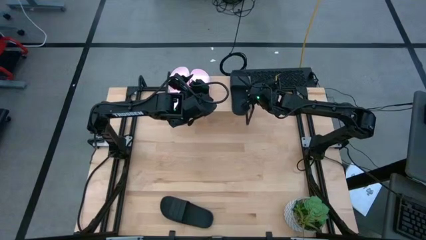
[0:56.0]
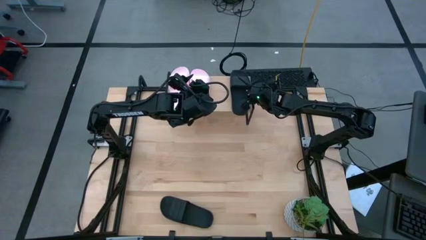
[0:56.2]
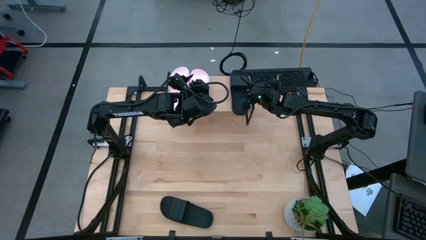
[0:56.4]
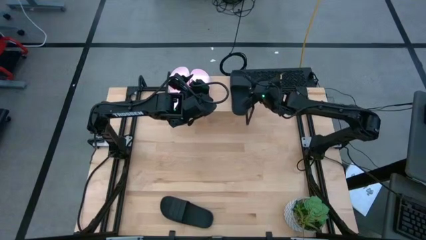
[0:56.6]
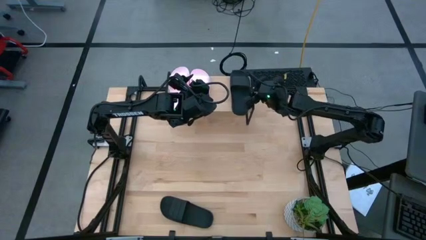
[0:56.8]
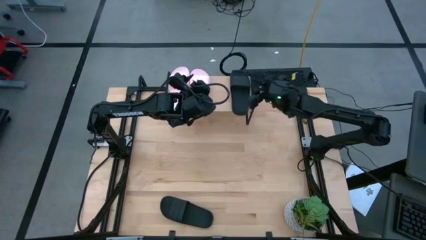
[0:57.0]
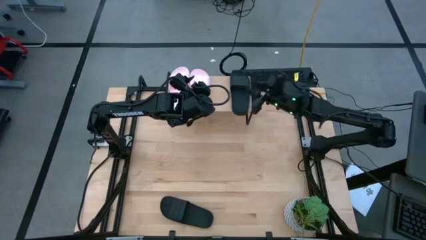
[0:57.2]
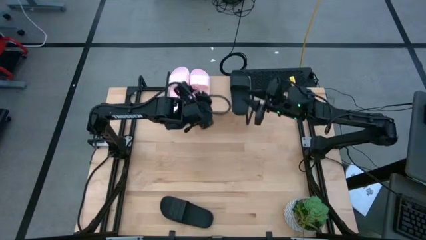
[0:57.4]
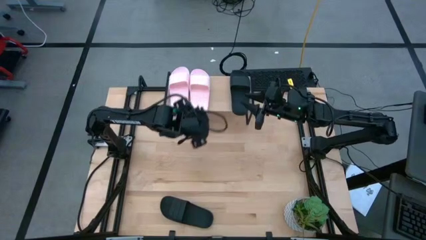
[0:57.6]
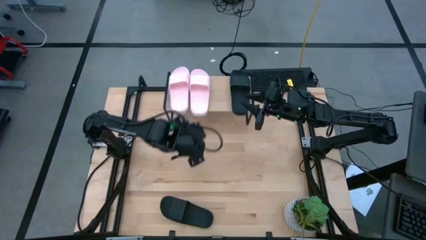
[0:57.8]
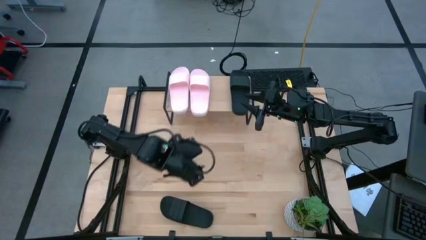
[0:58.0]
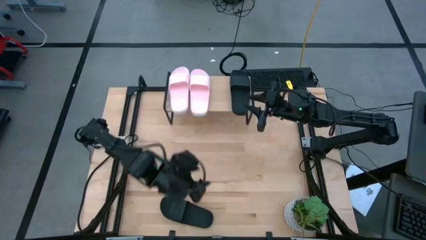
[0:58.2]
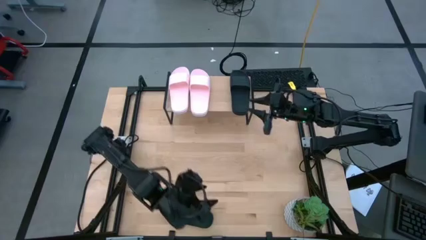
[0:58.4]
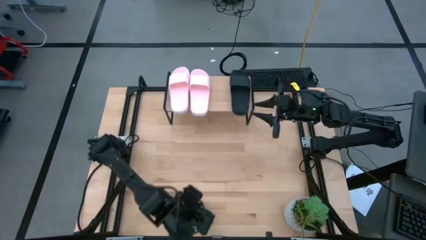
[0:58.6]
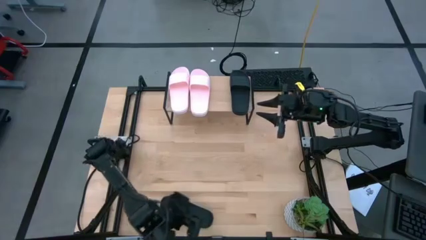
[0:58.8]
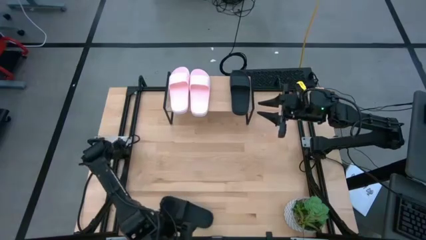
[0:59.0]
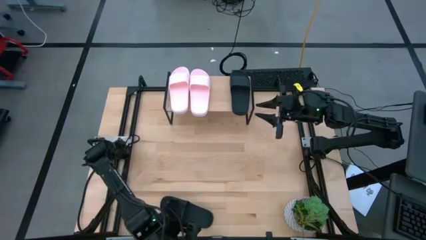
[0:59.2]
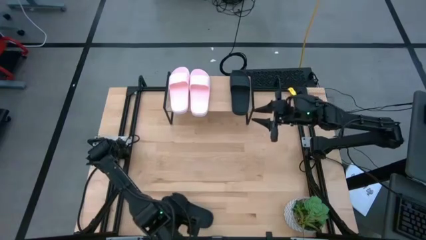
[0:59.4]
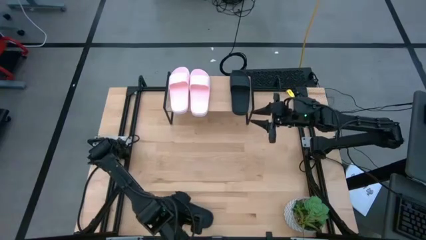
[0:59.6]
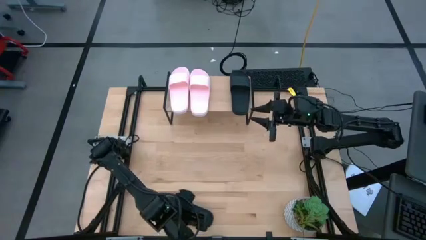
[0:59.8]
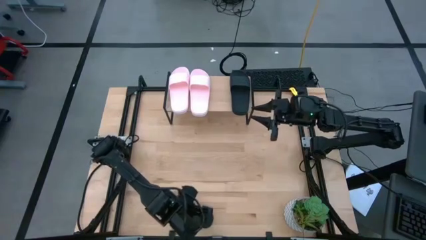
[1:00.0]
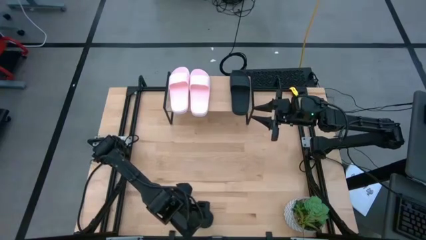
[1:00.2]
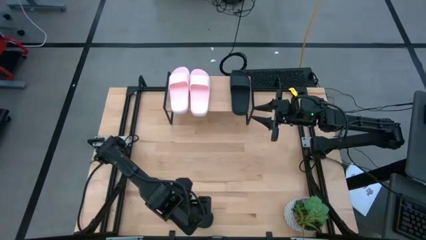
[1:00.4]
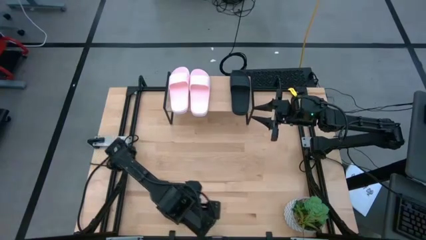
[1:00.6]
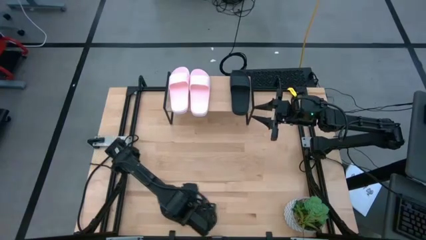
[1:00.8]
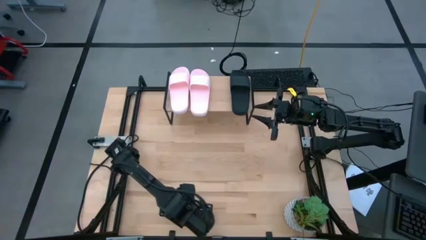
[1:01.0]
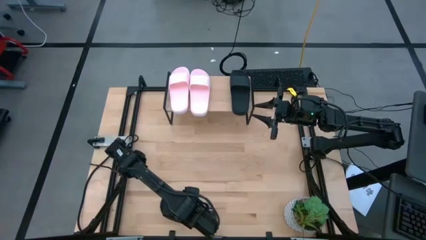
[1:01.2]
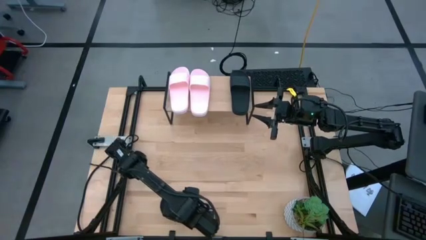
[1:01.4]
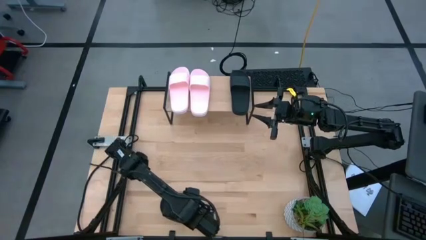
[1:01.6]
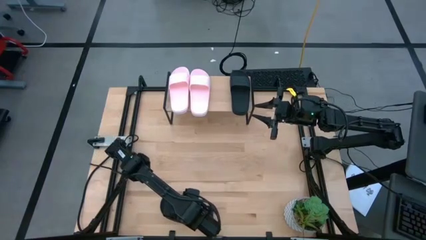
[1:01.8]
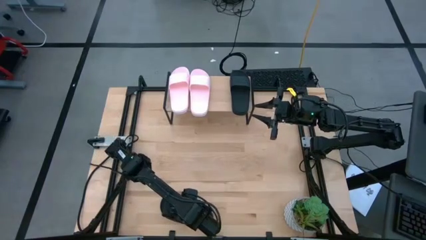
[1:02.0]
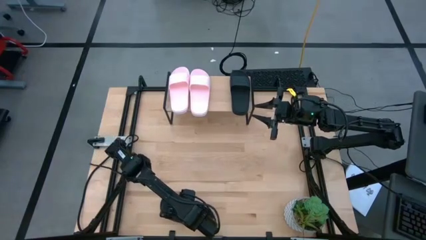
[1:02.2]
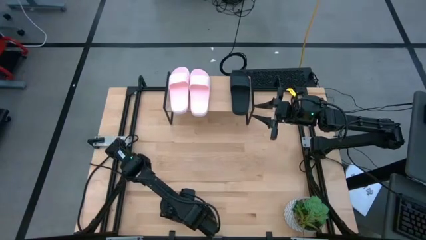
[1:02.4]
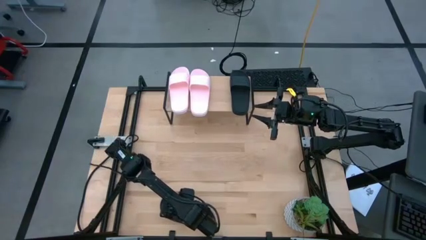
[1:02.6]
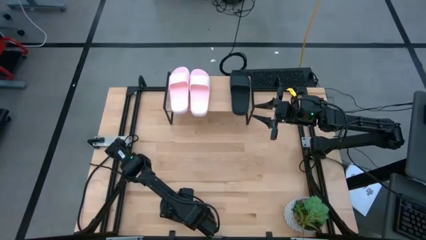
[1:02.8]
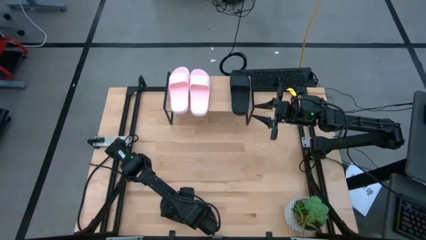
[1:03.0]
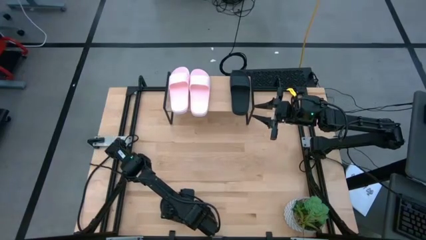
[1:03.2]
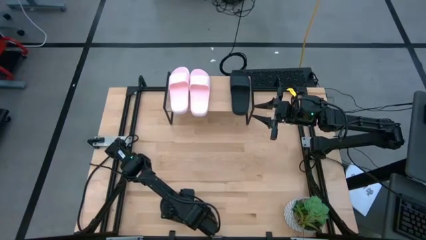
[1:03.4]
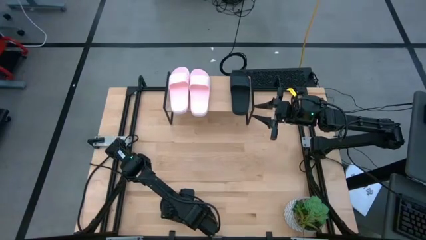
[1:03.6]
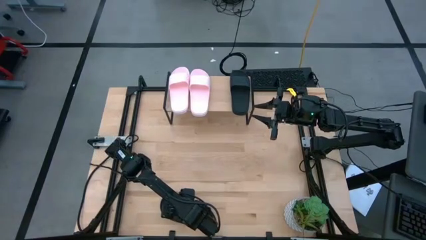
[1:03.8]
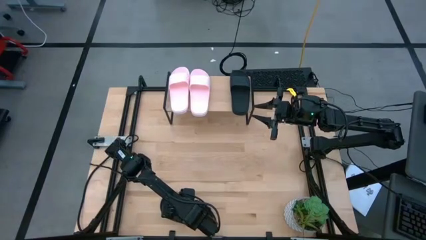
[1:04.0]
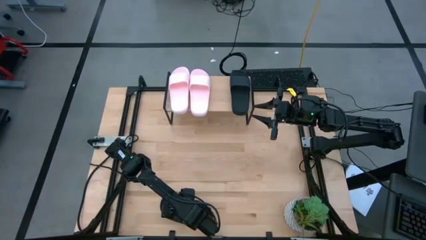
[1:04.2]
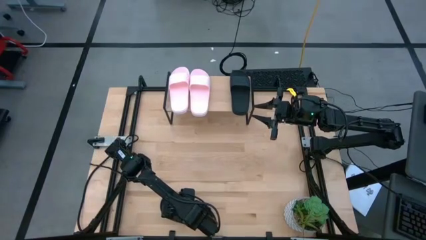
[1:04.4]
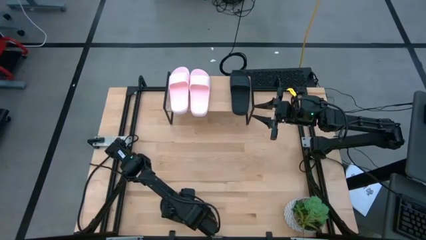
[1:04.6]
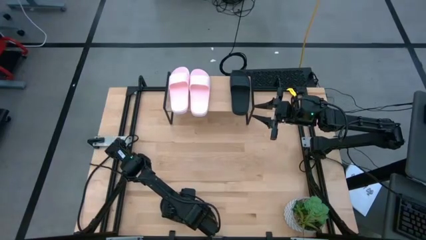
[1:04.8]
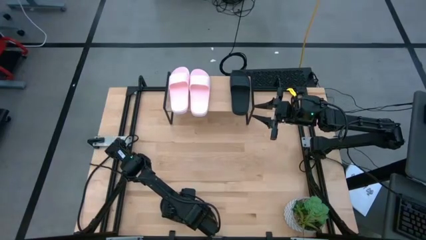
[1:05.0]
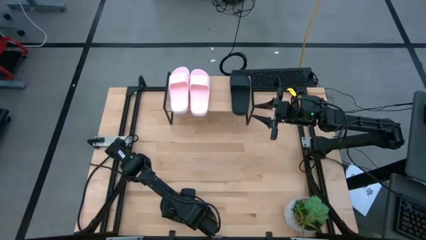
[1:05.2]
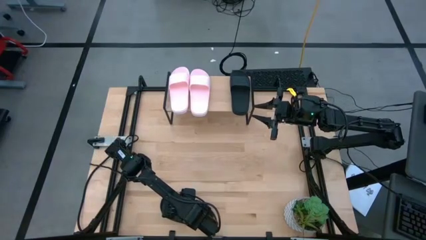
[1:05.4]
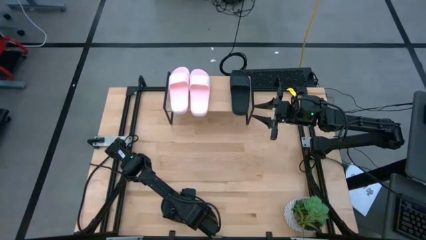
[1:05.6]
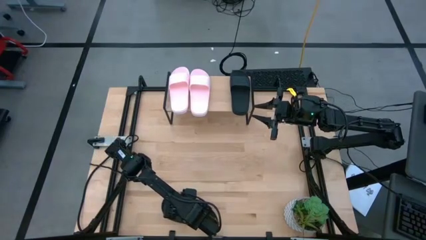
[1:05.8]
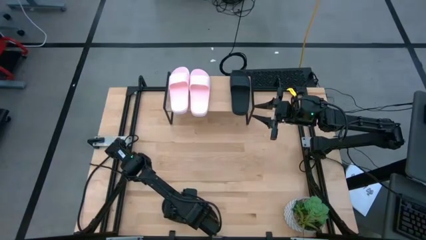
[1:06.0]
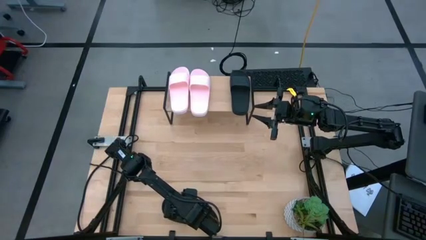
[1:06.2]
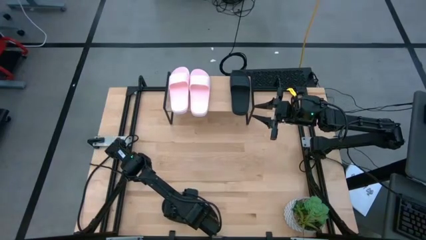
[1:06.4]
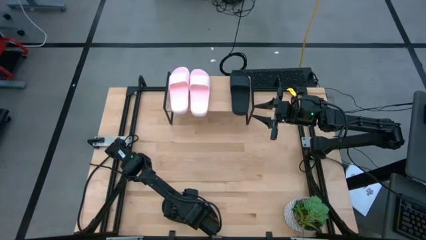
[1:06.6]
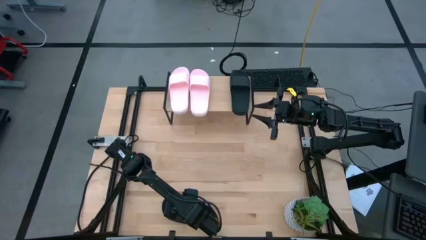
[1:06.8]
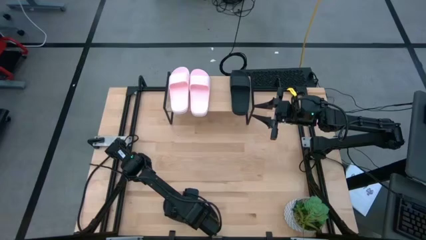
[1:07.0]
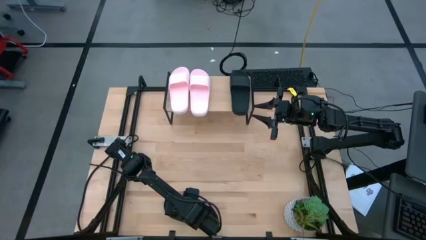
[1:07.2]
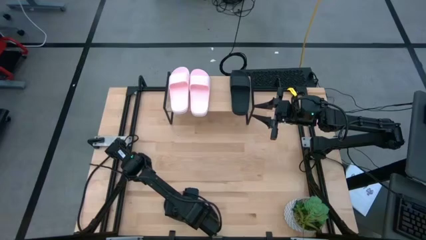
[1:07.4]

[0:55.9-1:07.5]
Task: Pick and place slides into the shelf
Put the black slide on the shelf
